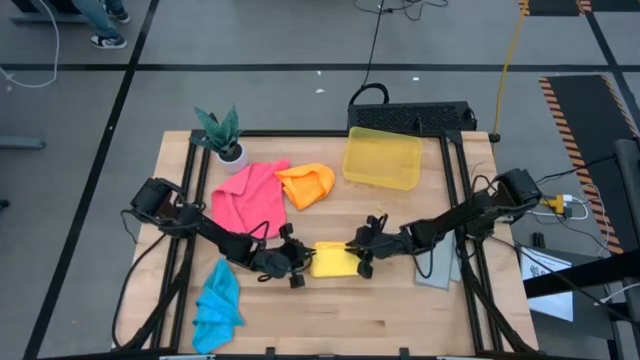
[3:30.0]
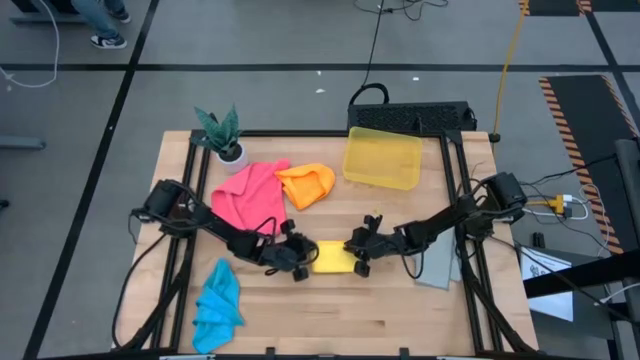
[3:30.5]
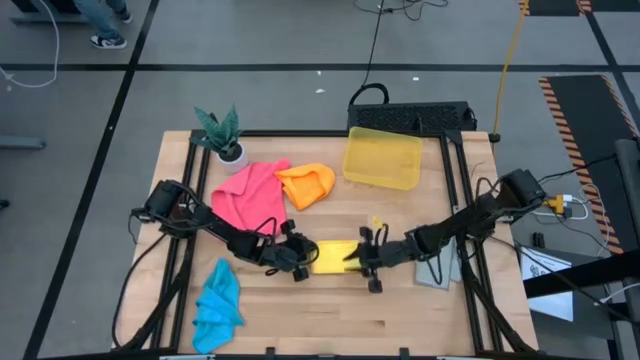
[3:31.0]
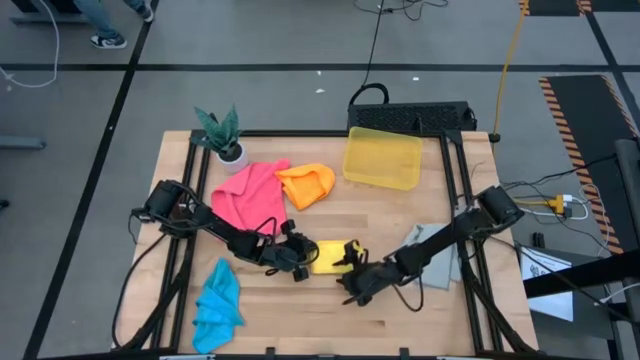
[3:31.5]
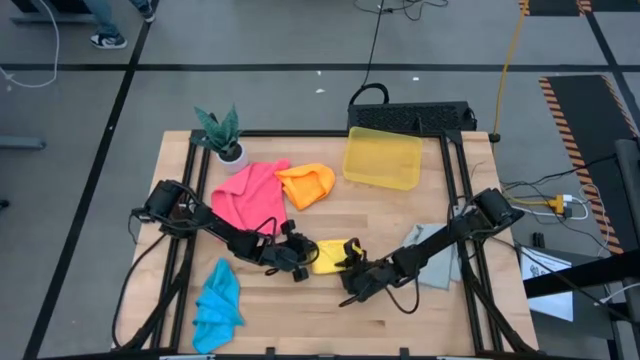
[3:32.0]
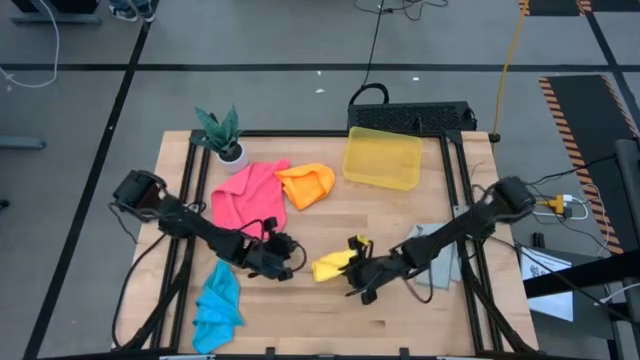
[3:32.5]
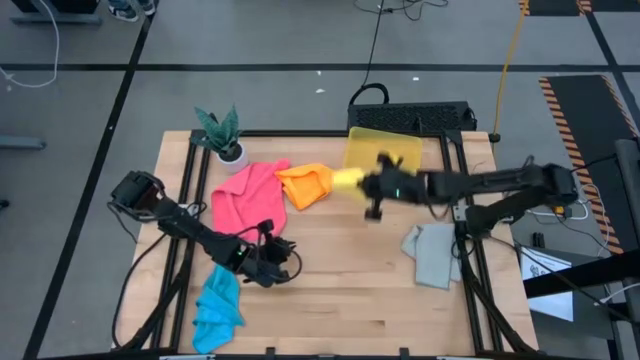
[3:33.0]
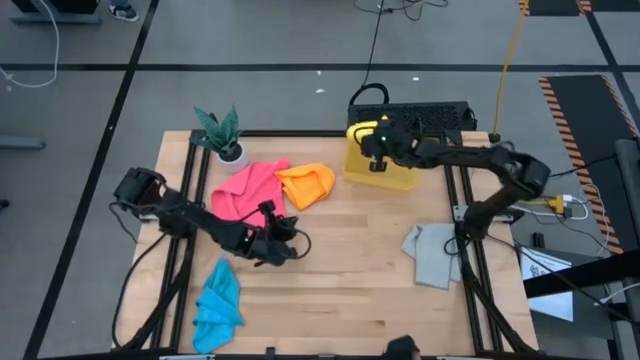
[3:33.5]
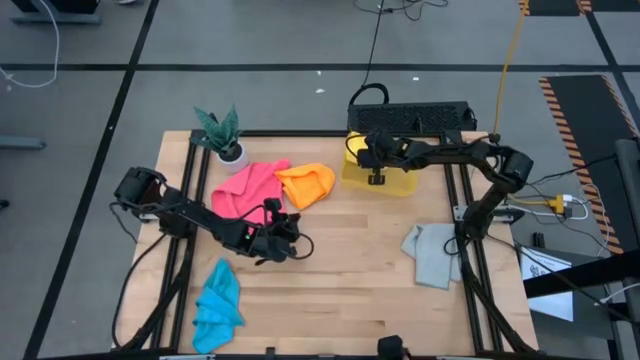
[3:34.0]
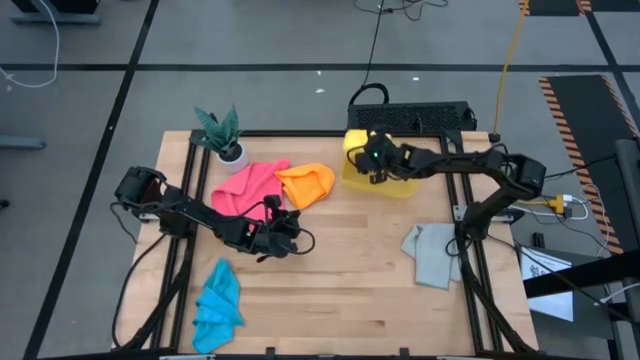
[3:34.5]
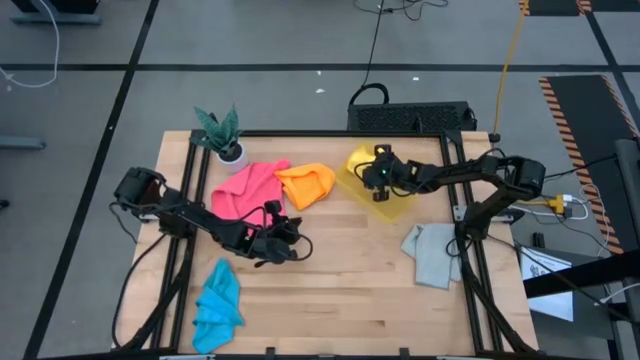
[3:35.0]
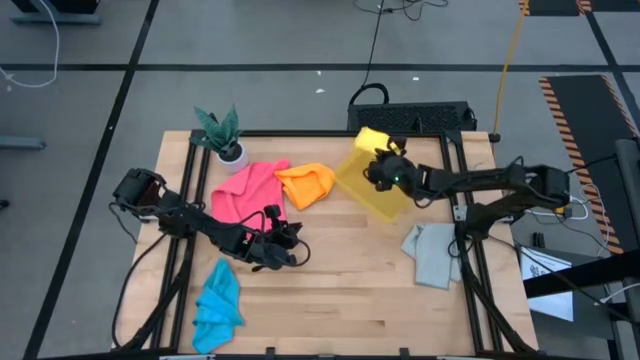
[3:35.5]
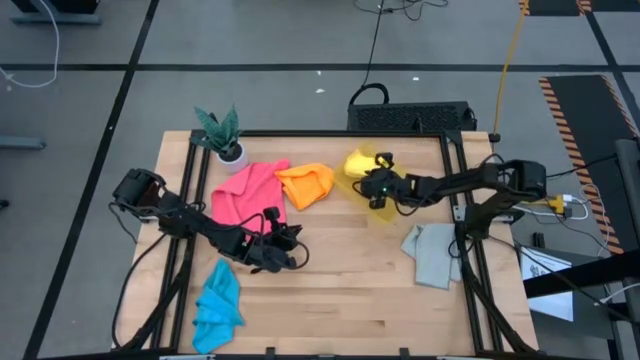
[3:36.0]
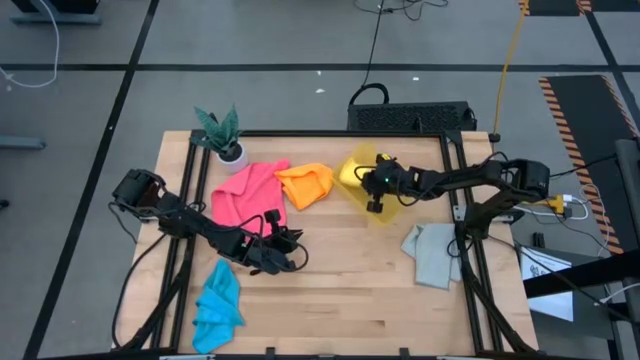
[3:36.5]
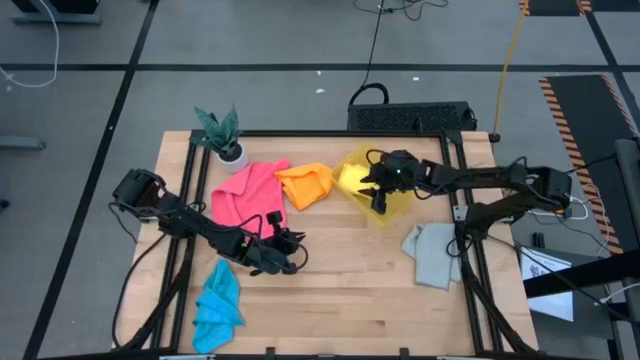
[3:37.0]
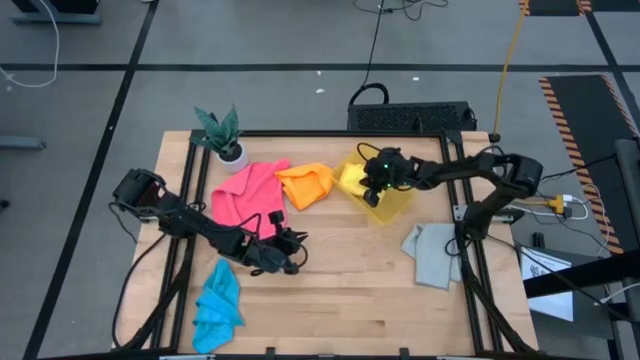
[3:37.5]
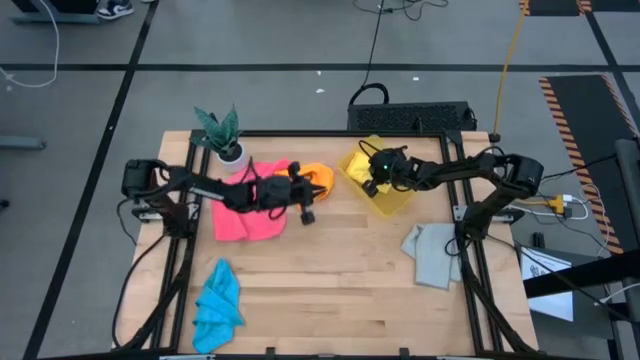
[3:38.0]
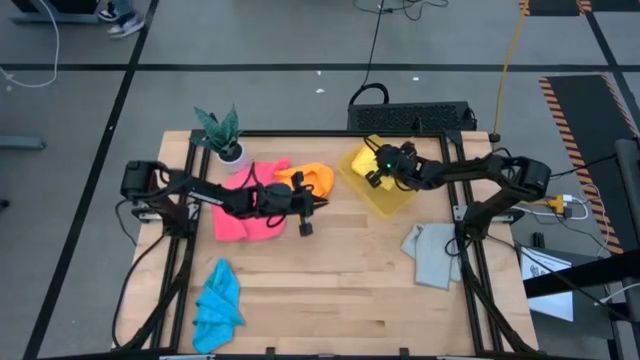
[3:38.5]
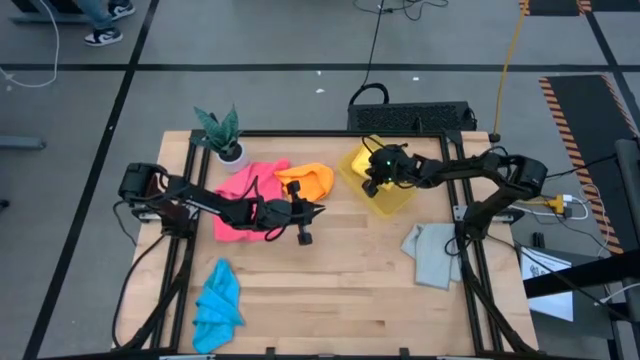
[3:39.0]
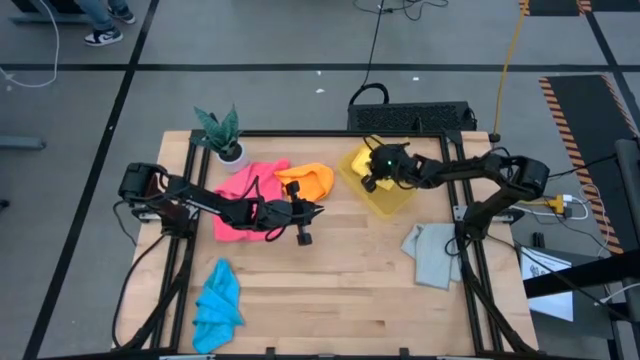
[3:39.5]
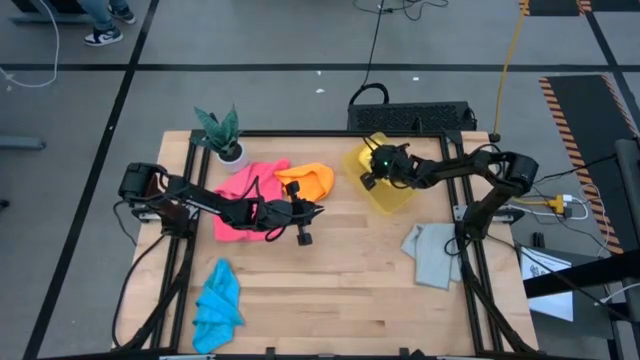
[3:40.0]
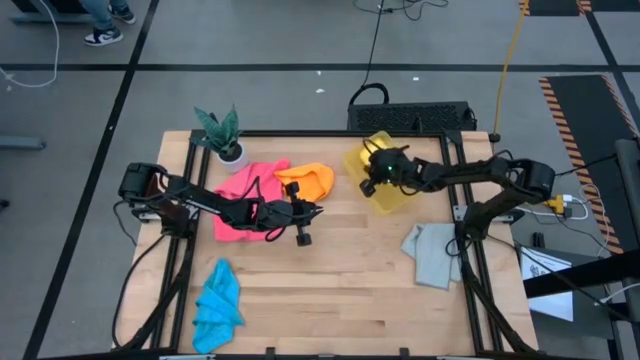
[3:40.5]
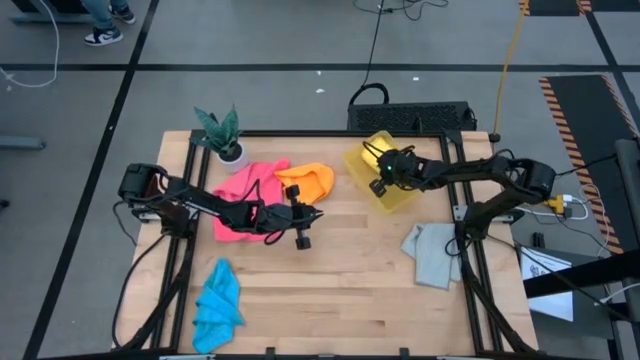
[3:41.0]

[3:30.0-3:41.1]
Task: Fold microfiber towels
Put the yellow kitchen towel into the yellow bin

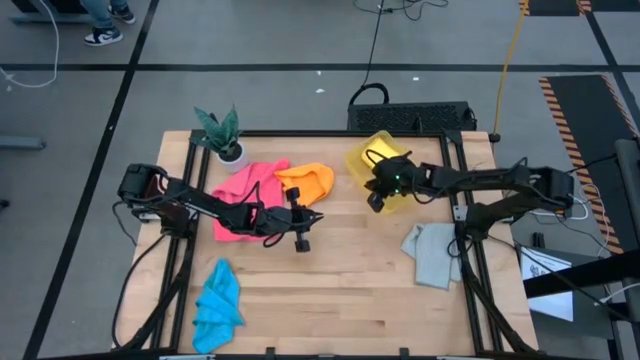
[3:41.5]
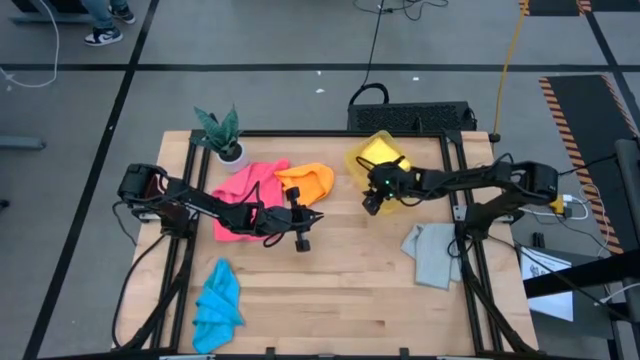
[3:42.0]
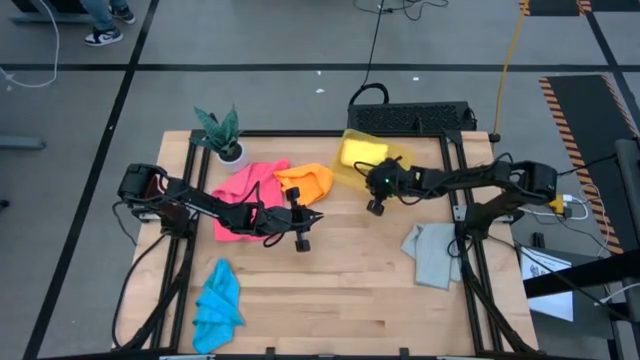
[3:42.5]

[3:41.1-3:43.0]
Adjust the yellow bin

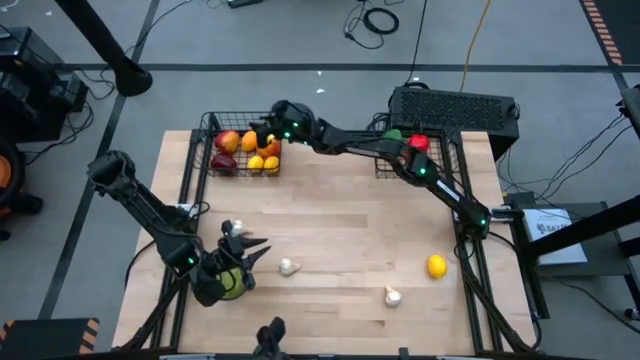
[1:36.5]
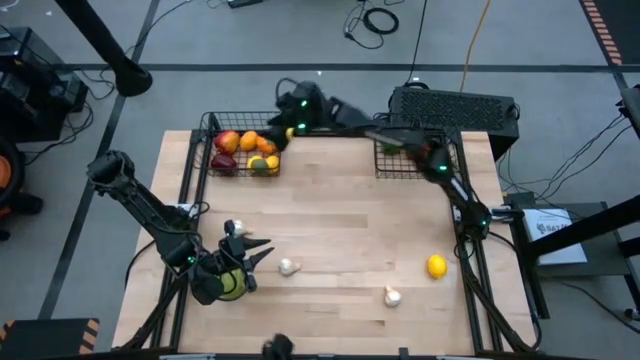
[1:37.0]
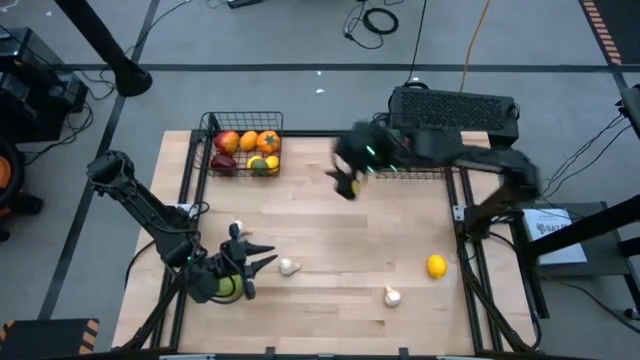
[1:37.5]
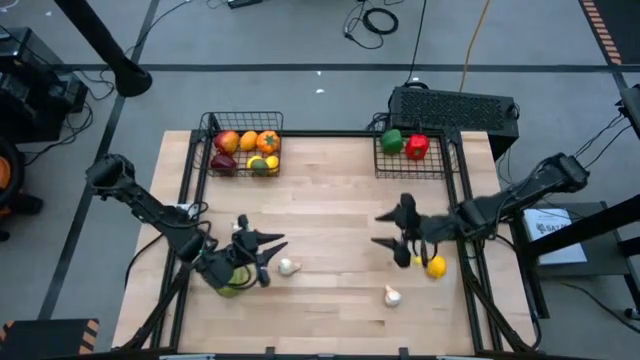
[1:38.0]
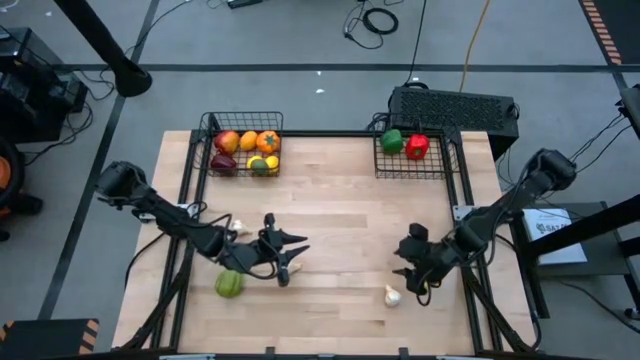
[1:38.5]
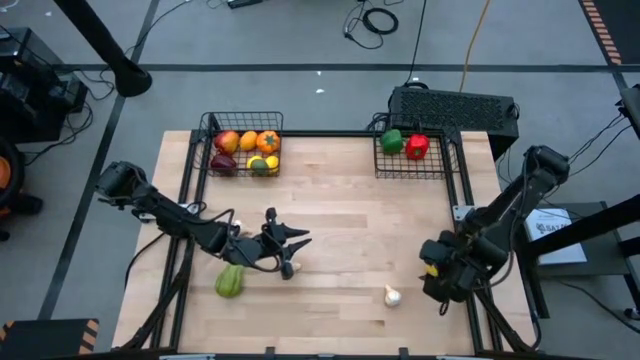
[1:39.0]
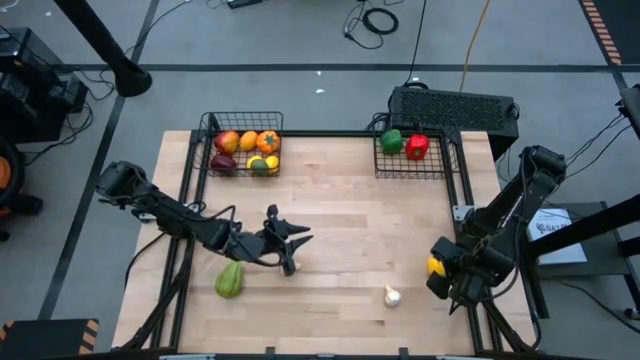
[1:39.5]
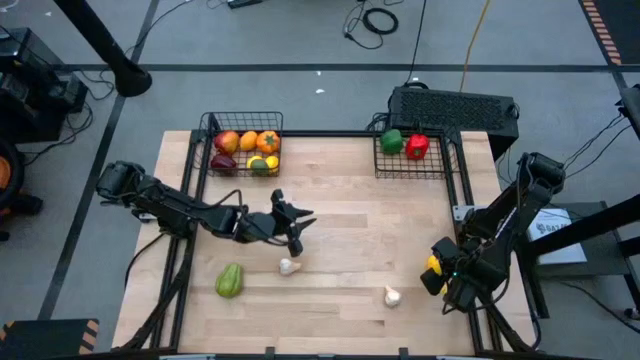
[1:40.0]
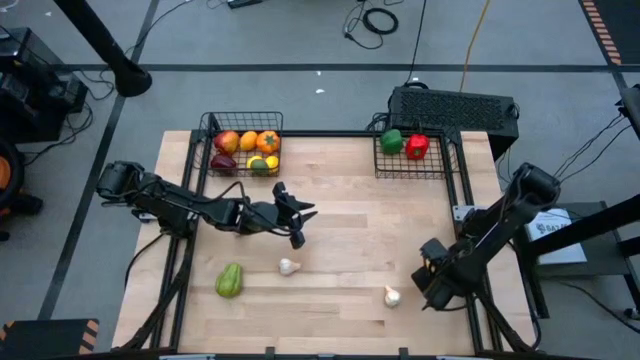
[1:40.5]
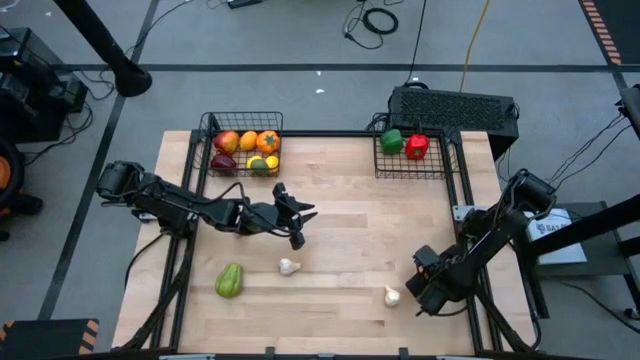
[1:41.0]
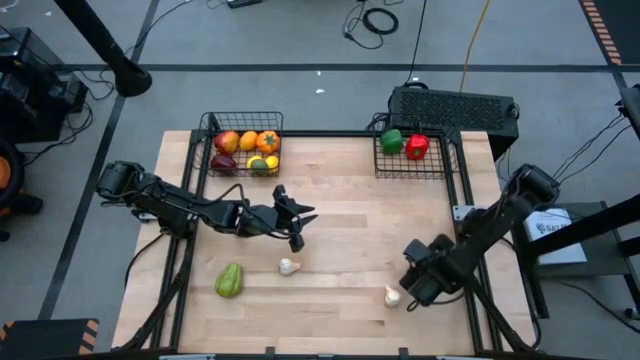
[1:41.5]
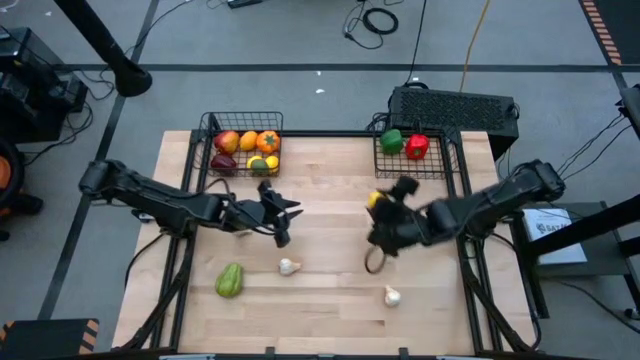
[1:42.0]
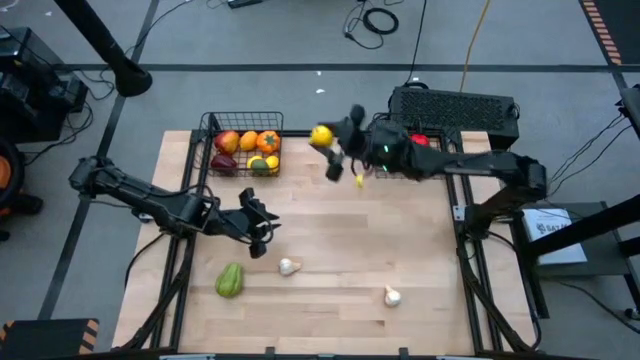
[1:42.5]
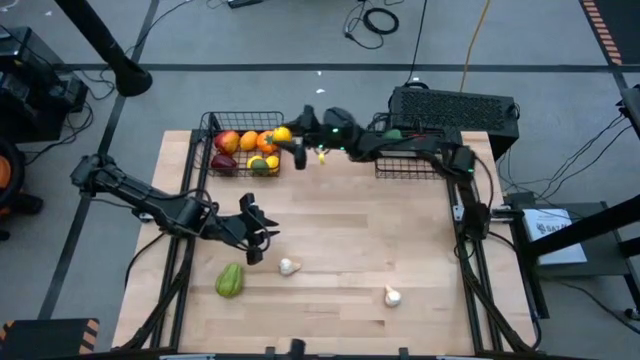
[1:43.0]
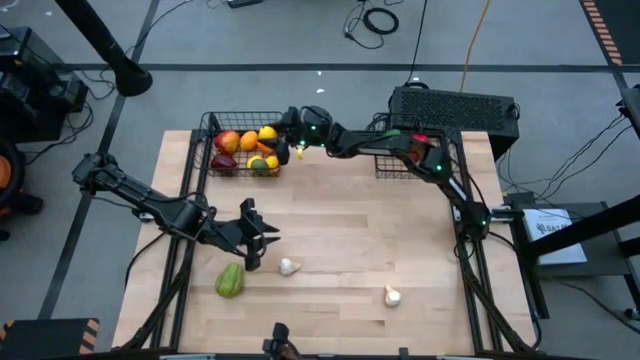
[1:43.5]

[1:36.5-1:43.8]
Task: Sort produce into baskets
Put the yellow lemon in the left basket
